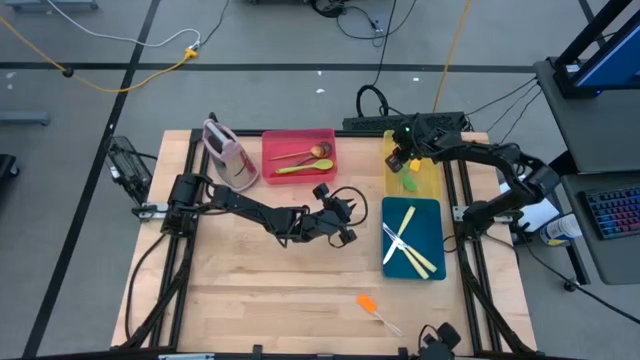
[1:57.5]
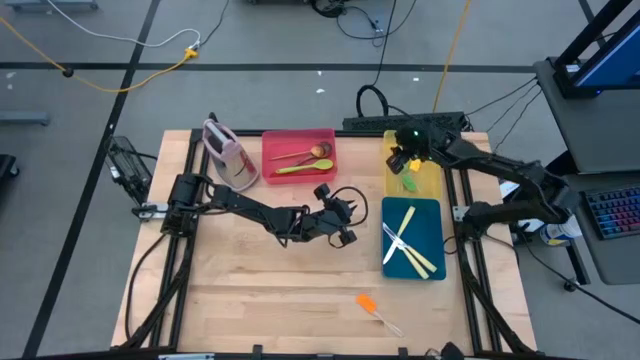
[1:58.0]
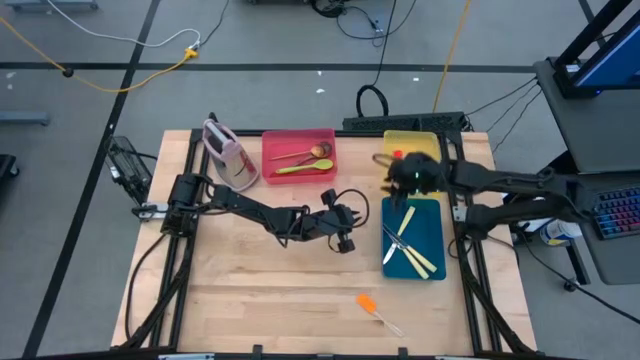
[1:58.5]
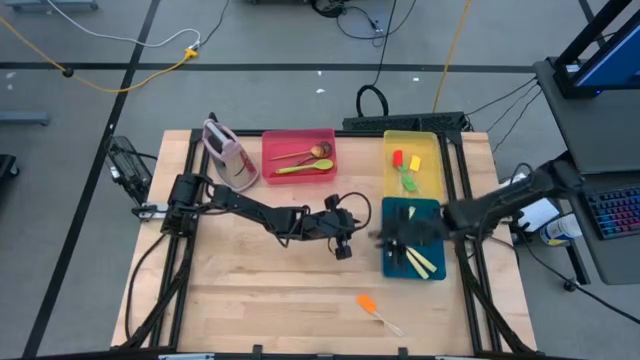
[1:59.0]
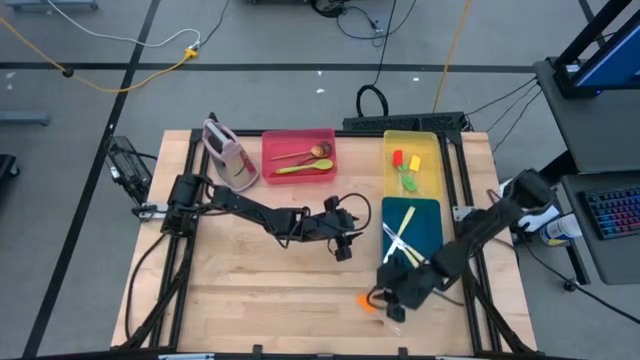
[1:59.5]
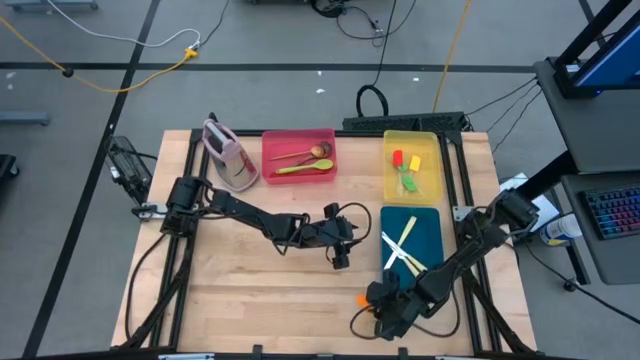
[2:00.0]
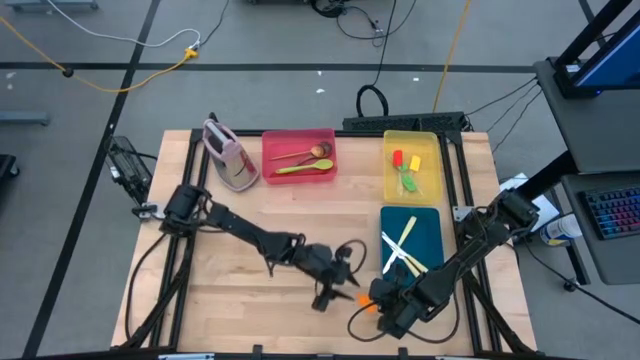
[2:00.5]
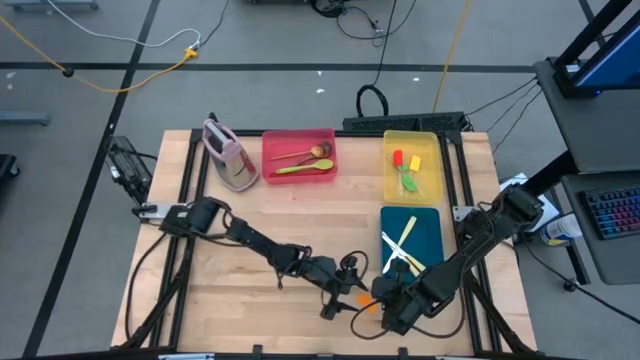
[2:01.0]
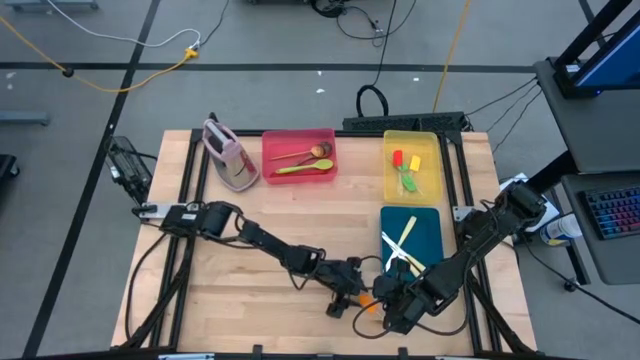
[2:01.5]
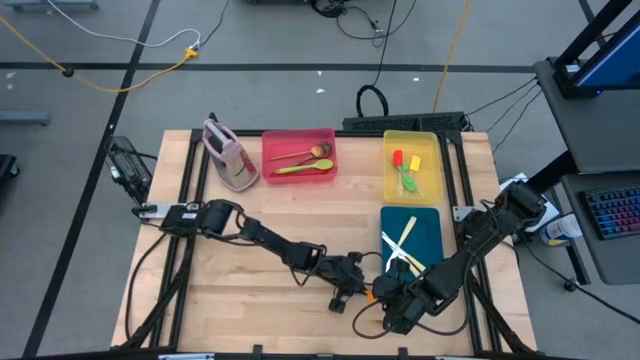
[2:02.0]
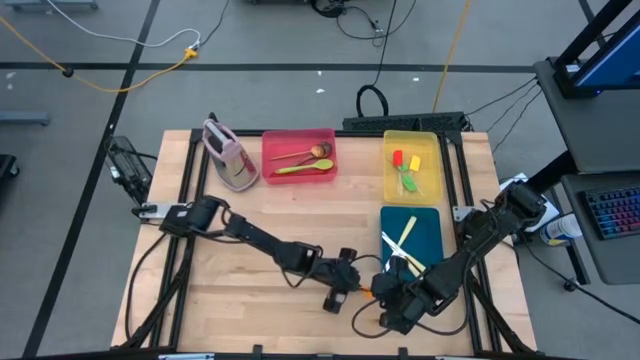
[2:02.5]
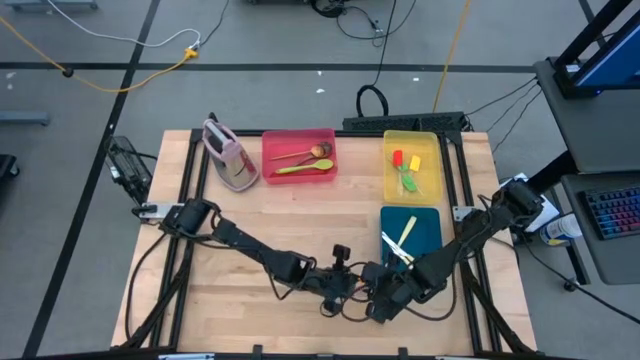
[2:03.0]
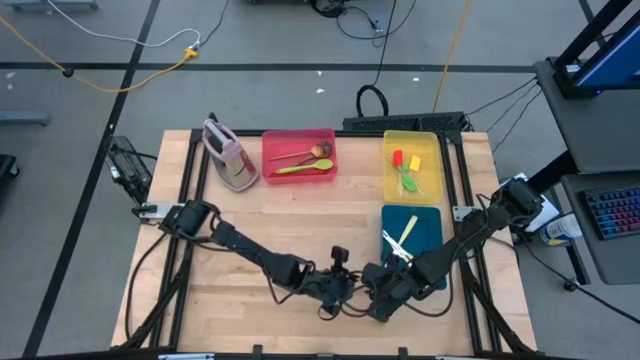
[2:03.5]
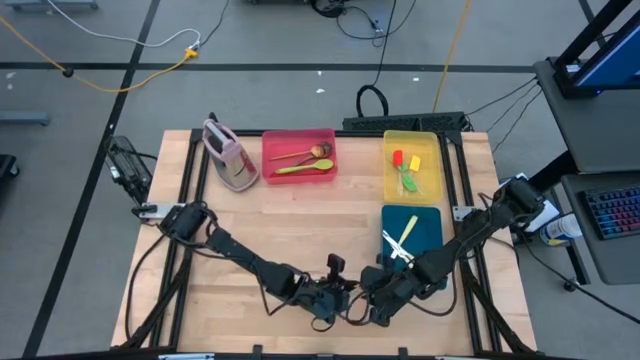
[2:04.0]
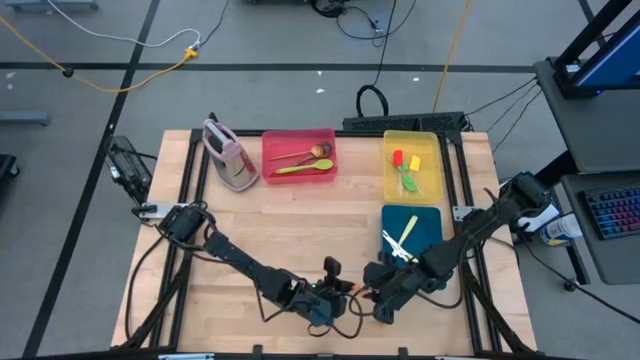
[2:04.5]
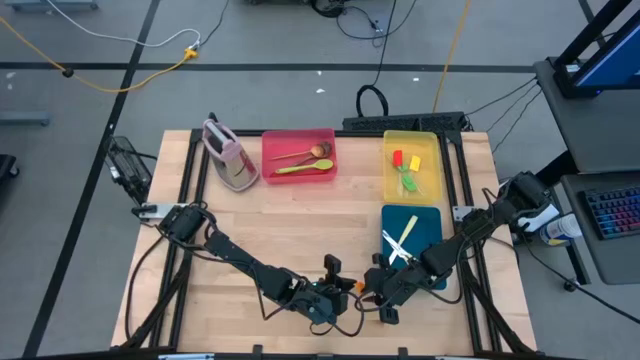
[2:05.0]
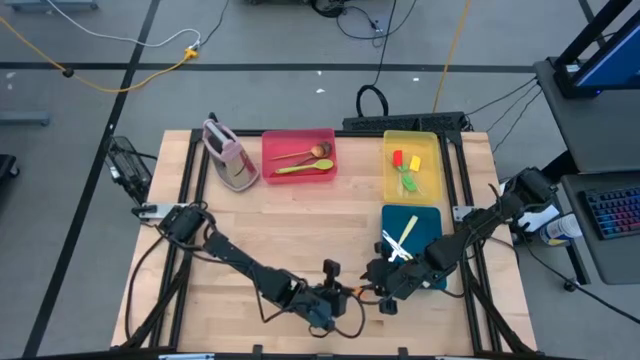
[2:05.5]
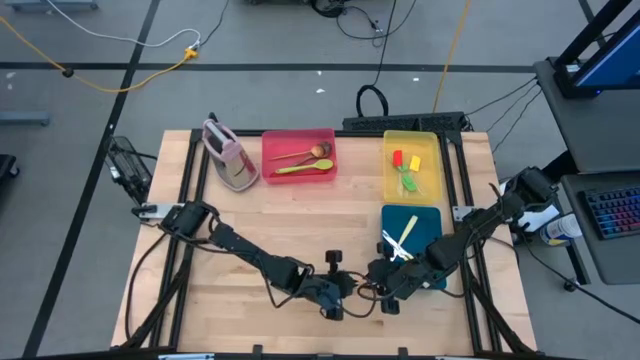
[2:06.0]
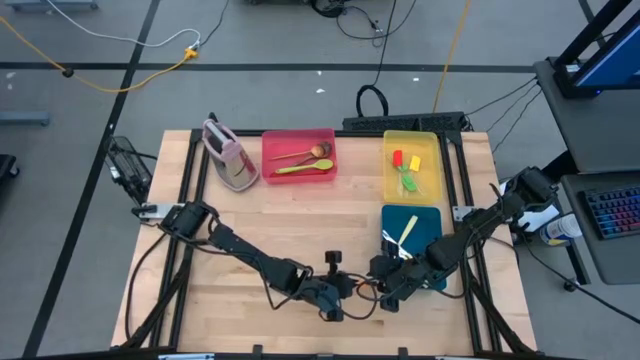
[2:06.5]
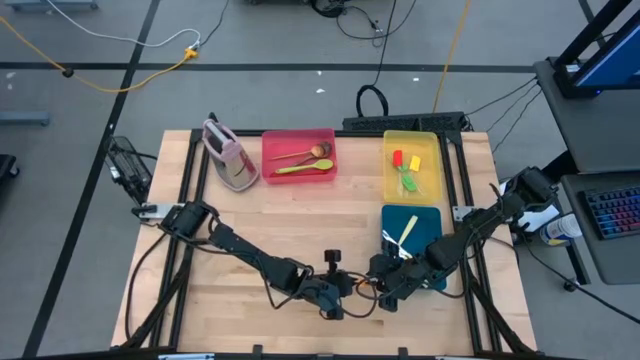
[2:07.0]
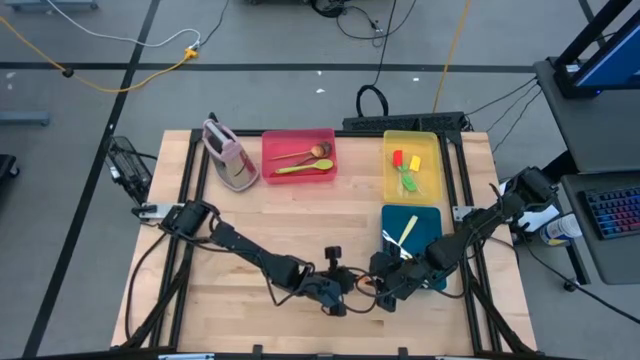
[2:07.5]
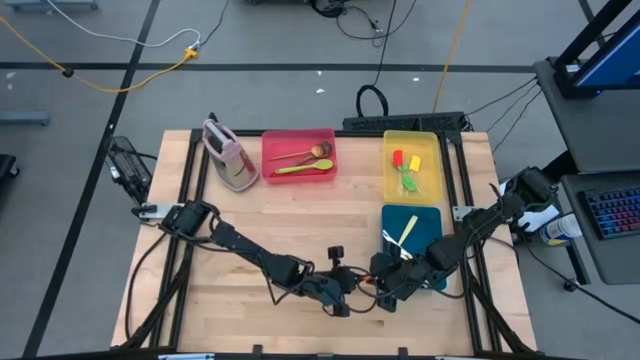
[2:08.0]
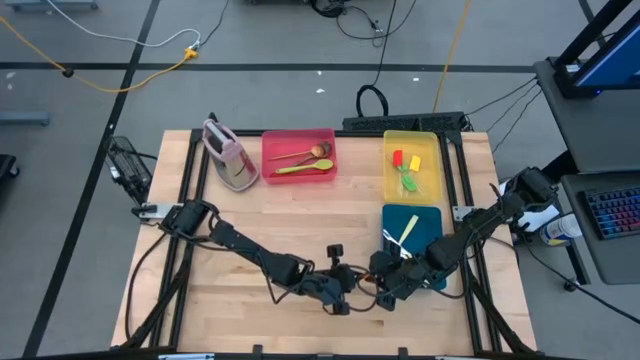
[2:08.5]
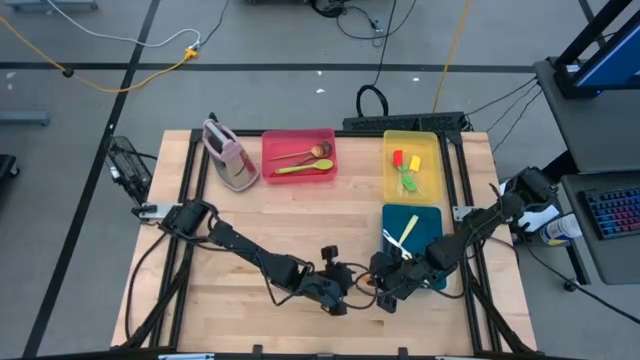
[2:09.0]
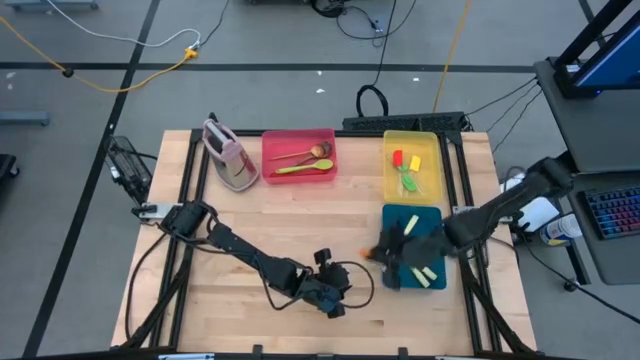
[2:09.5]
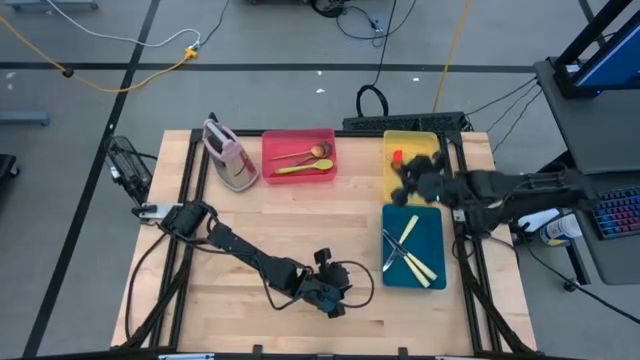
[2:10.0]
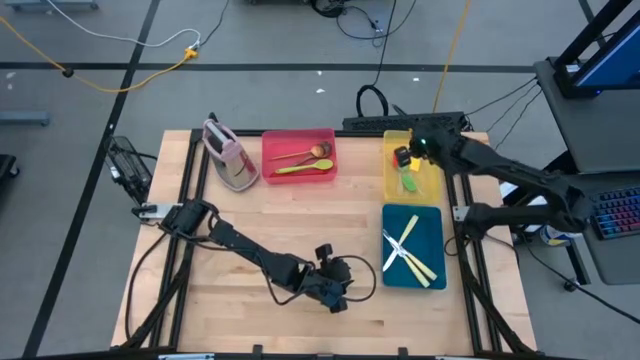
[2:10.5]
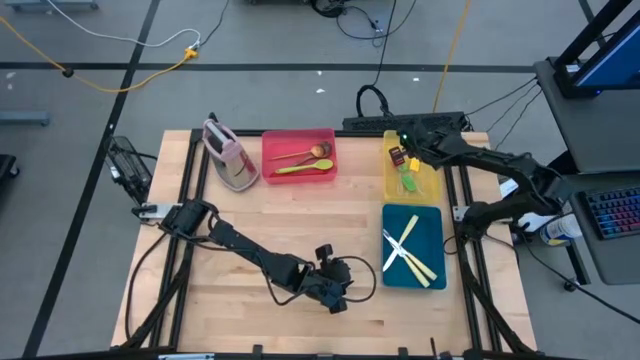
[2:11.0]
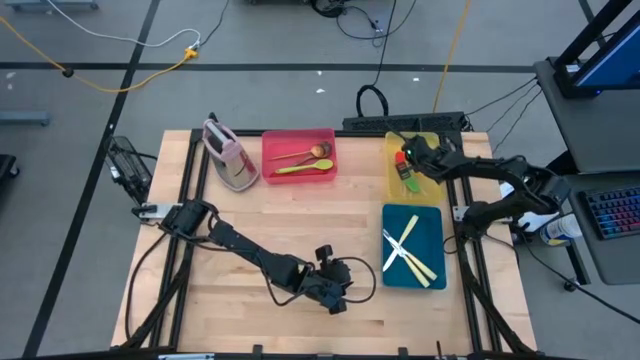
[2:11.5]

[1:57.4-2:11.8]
Task: Pick & Place Kitchen Items
Put the orange spatula into the yellow bin

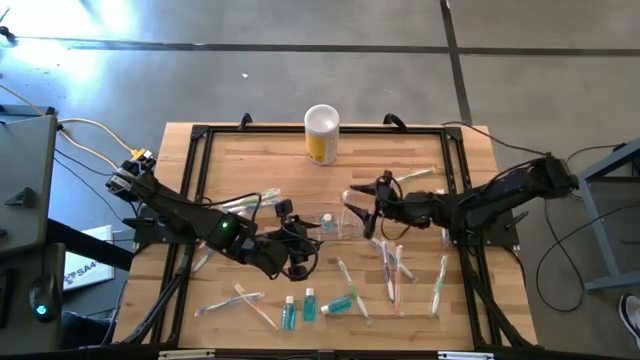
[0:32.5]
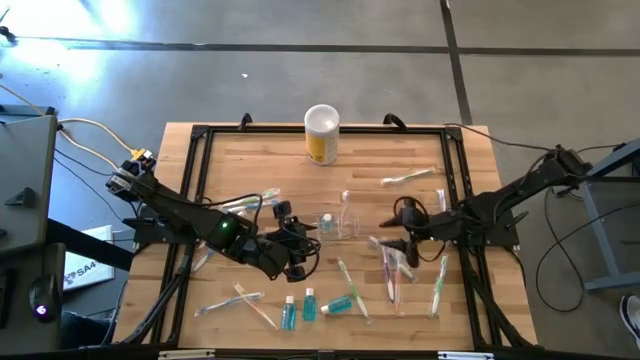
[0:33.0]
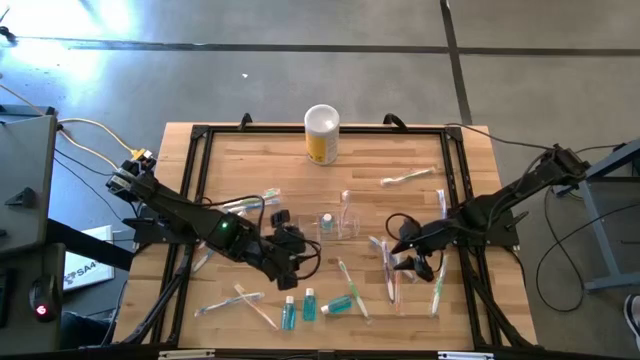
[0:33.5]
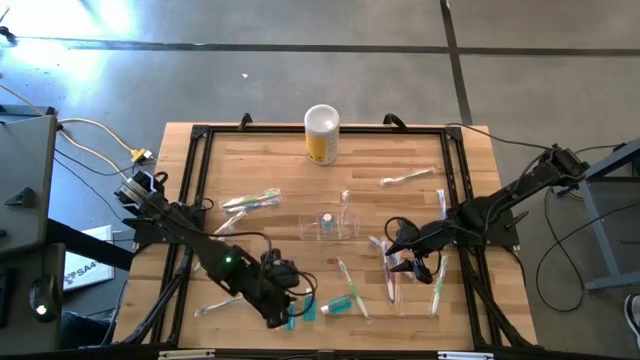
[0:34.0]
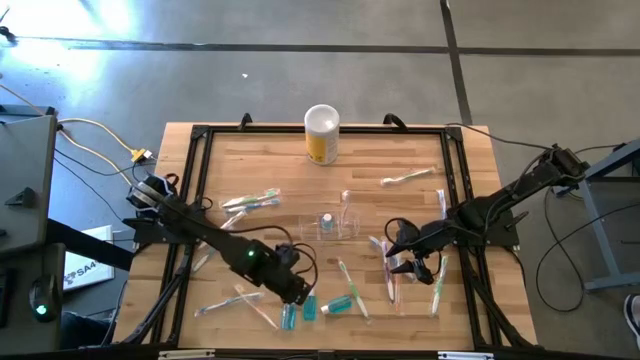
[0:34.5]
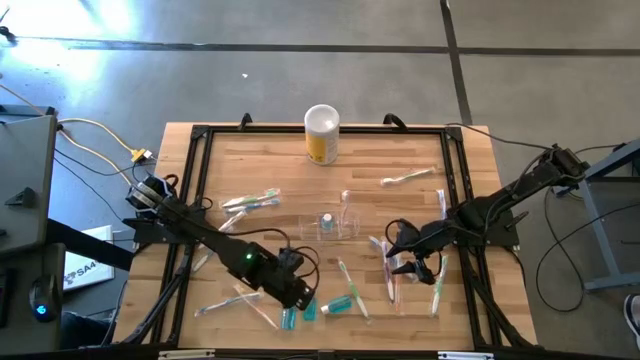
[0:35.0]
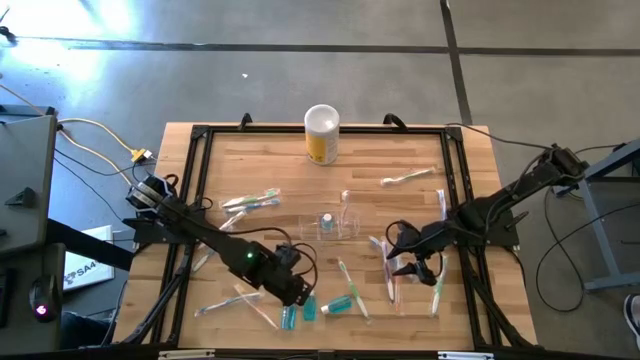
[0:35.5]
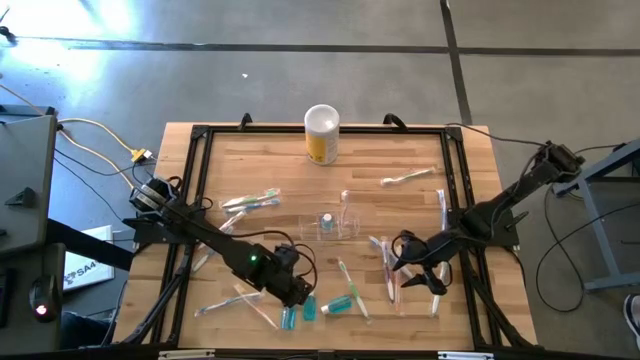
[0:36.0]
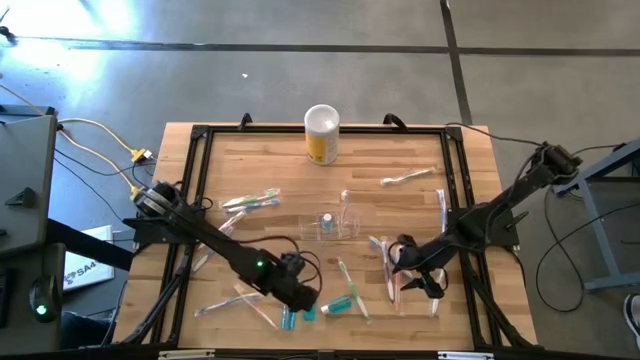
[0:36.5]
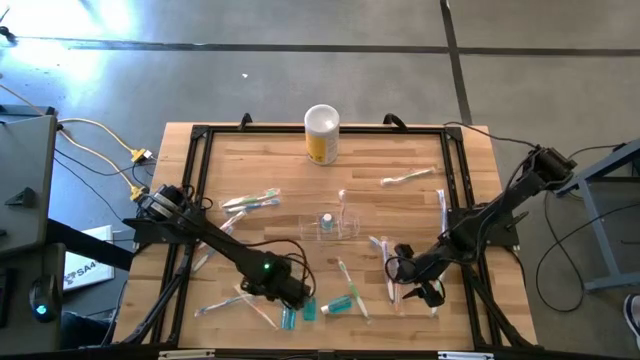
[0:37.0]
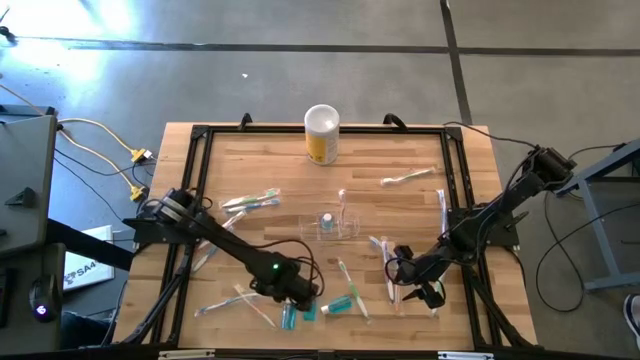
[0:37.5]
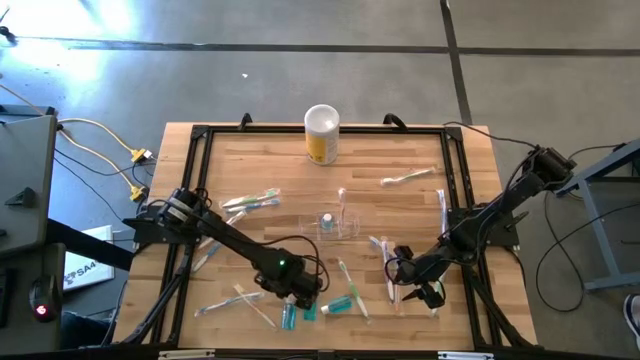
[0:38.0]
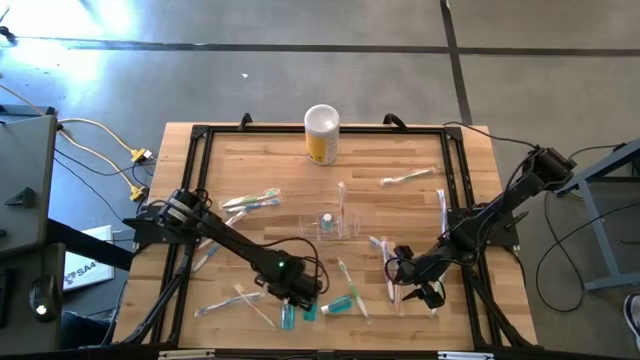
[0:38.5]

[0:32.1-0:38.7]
Task: Pick & Place toothbrushing station
Put the blue mouthwash into the middle part of the transparent organizer
